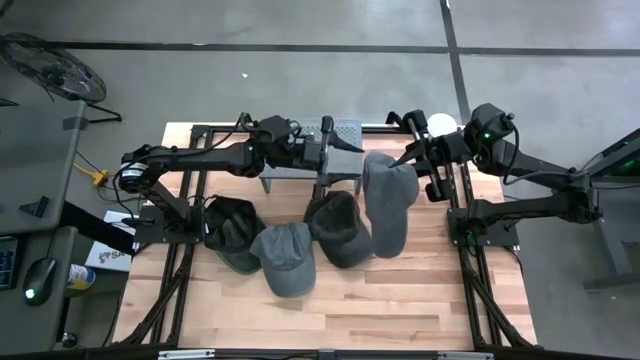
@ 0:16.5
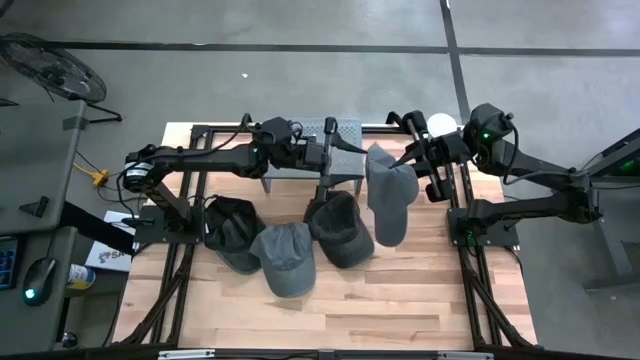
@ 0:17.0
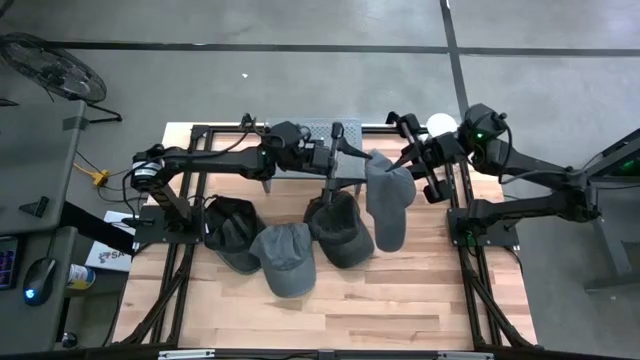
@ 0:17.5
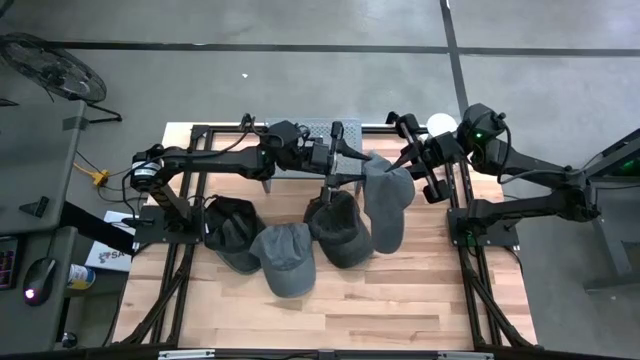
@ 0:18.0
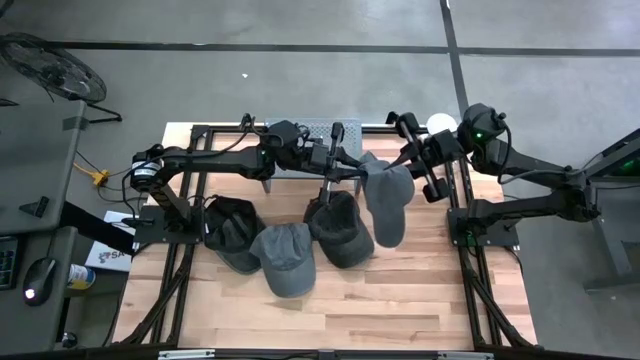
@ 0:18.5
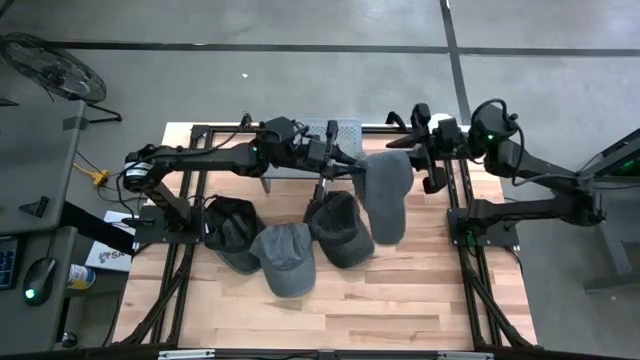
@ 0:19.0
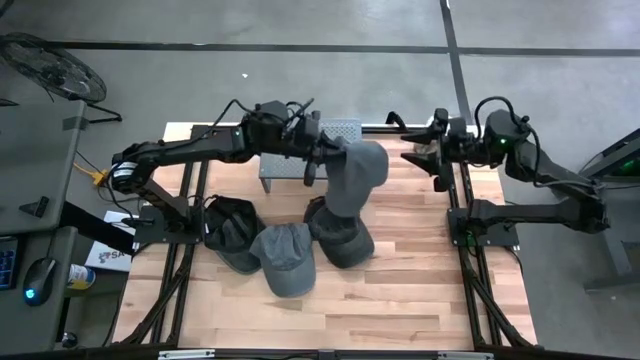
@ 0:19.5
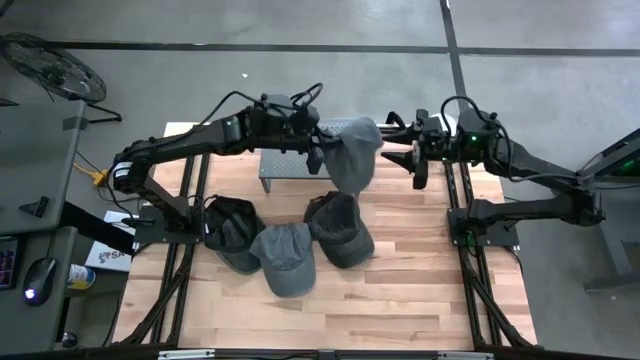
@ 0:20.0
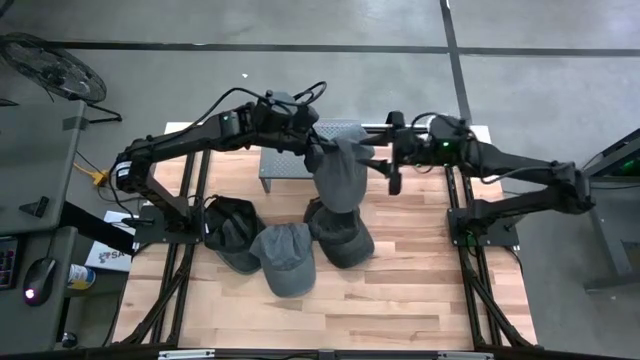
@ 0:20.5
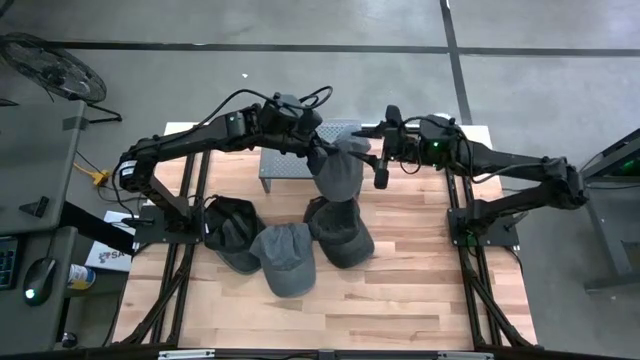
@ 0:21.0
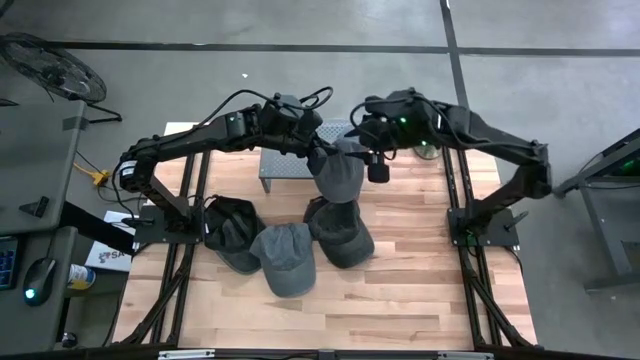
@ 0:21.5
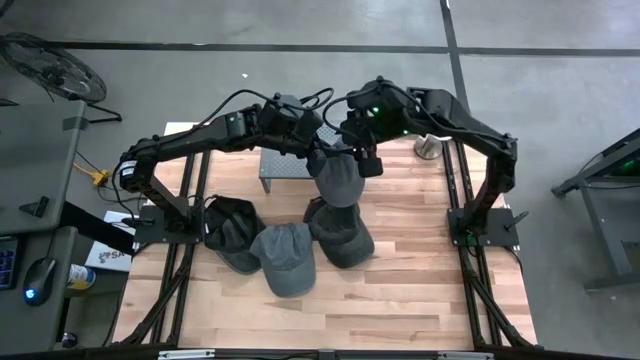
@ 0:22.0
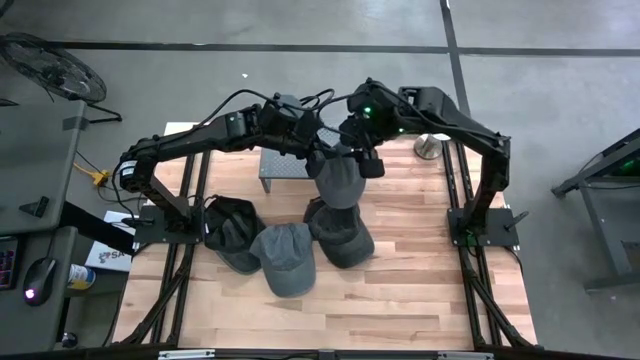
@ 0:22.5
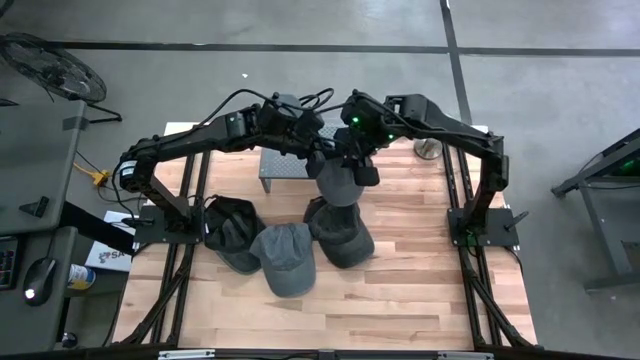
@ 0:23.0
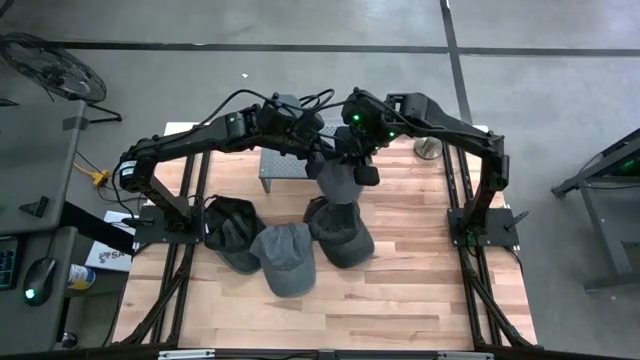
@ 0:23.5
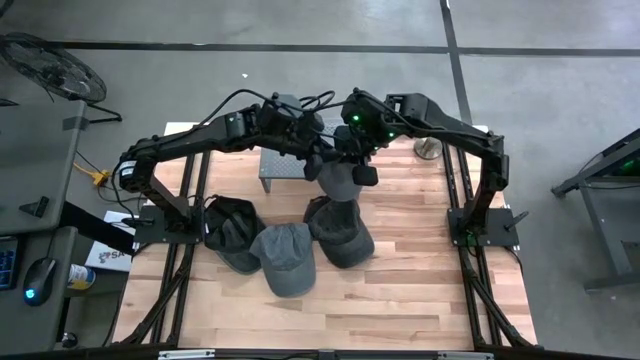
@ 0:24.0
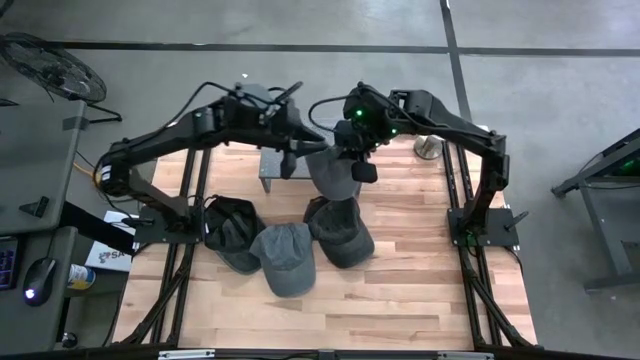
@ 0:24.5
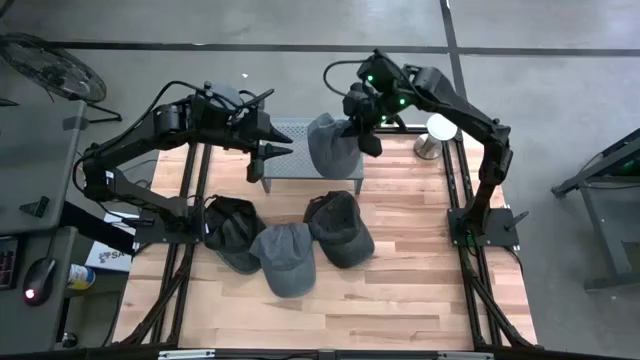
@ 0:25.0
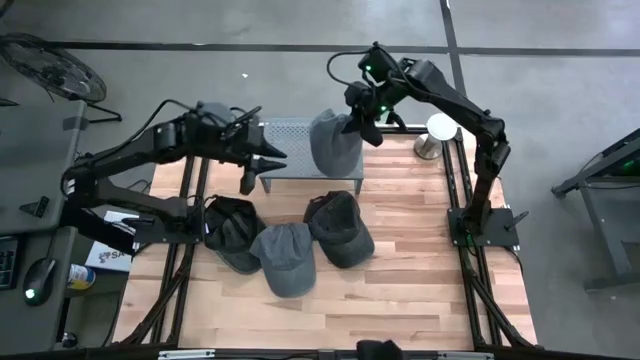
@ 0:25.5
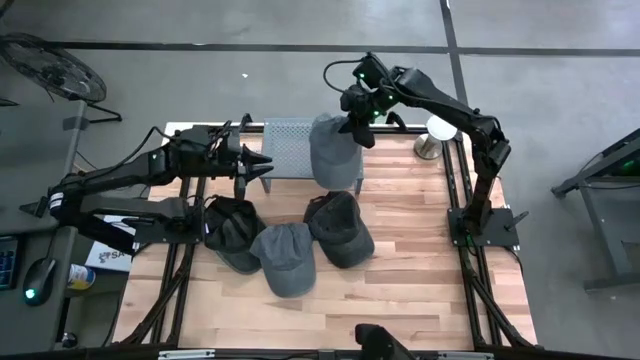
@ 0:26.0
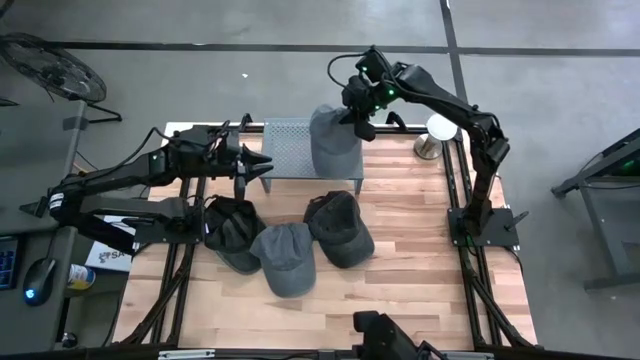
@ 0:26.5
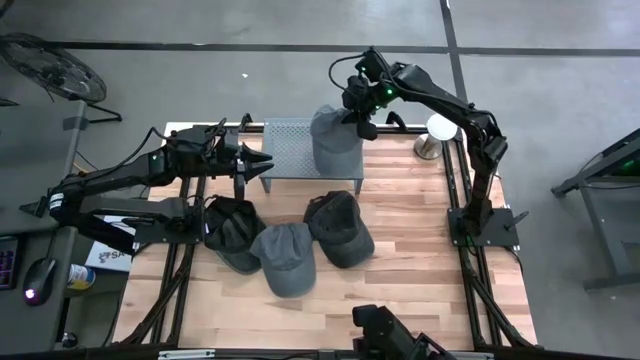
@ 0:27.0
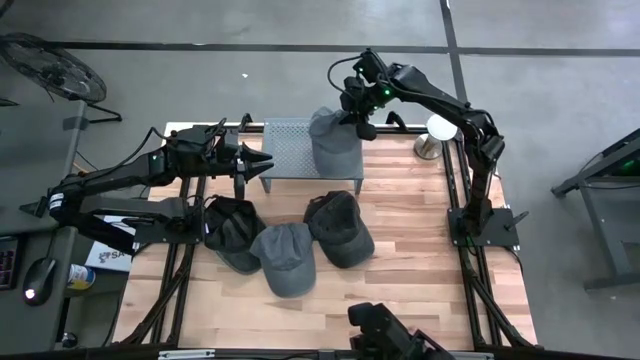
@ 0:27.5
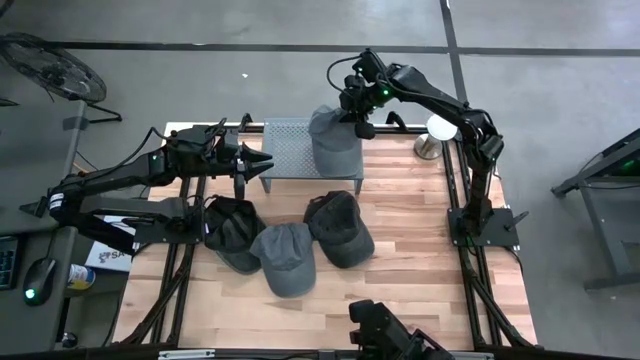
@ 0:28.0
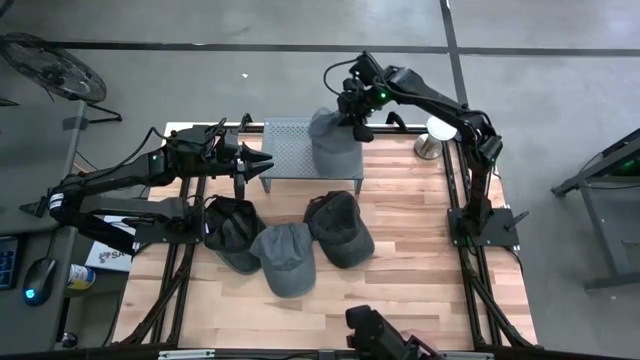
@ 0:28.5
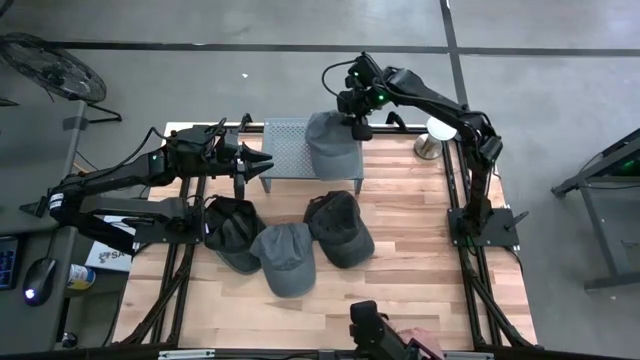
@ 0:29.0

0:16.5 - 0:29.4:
Task: Pick & Place hat
Put the right gray cap on the shelf

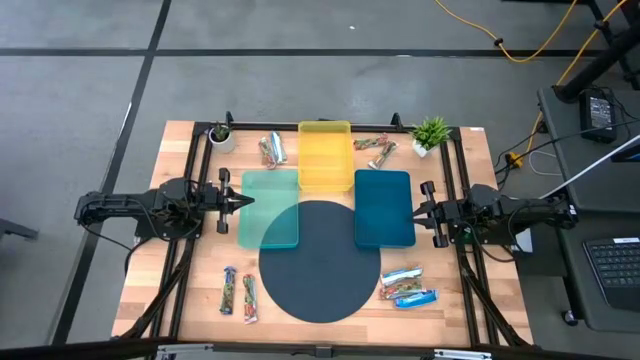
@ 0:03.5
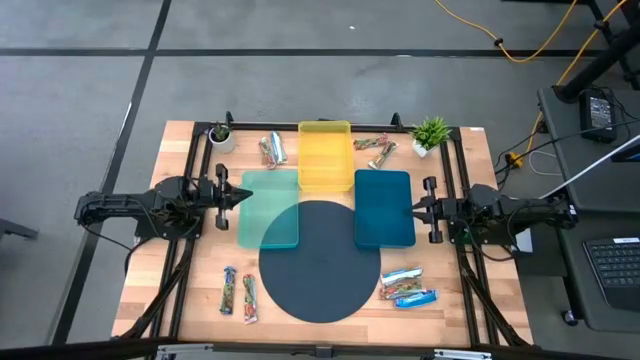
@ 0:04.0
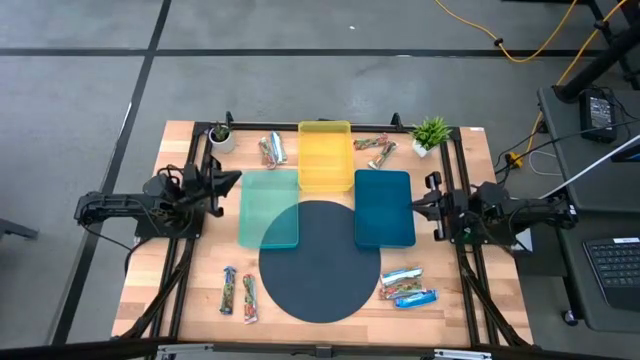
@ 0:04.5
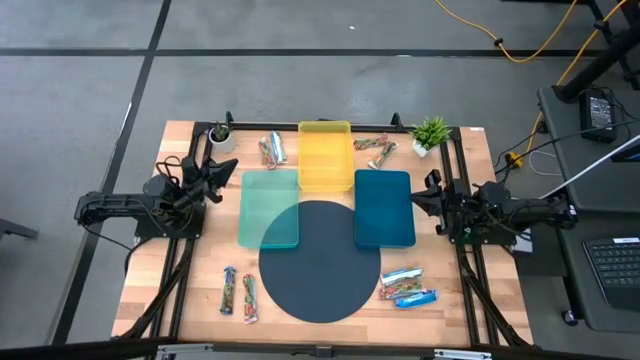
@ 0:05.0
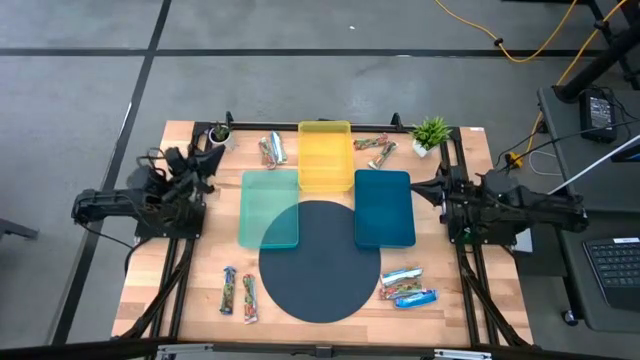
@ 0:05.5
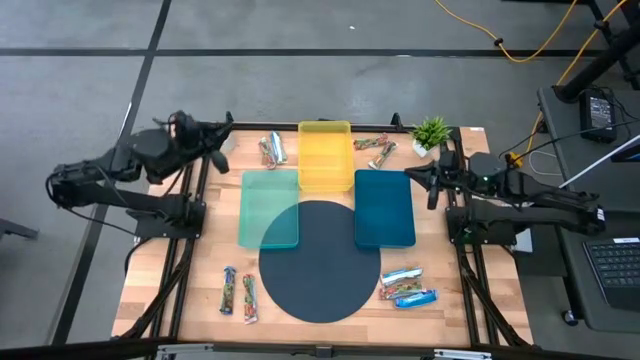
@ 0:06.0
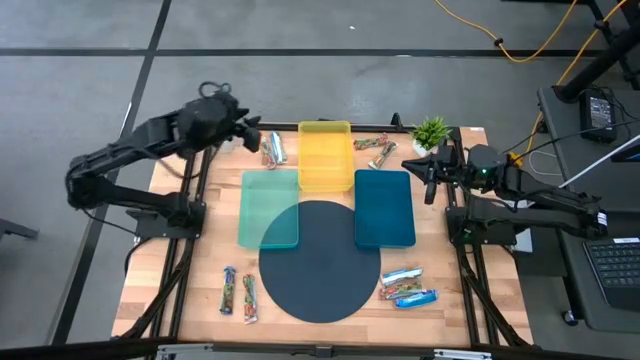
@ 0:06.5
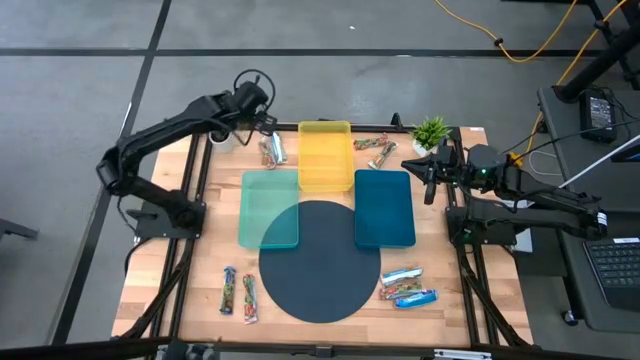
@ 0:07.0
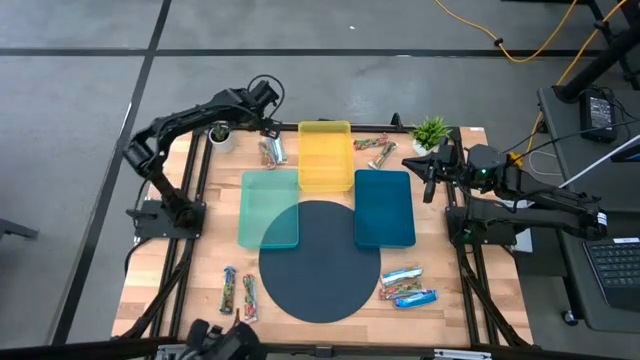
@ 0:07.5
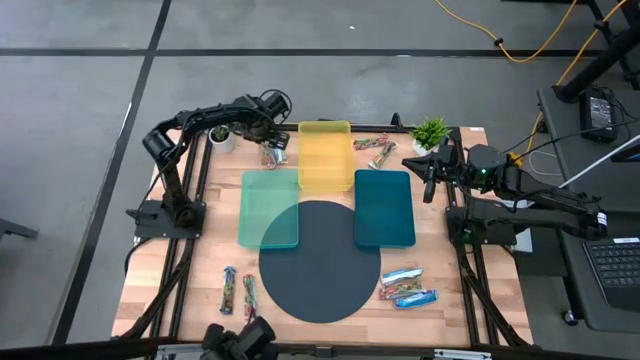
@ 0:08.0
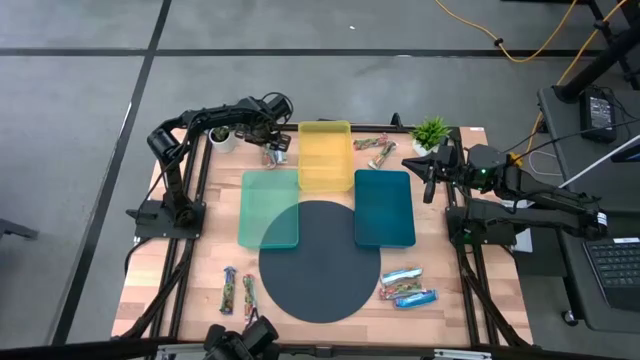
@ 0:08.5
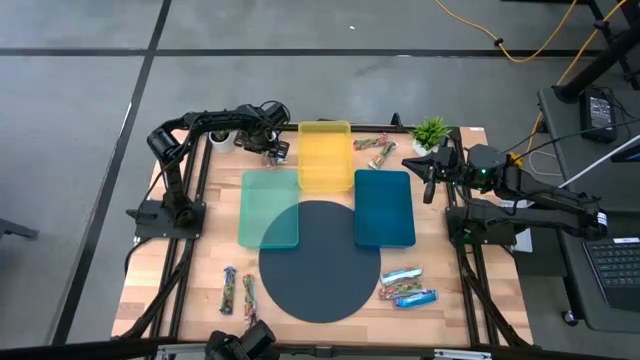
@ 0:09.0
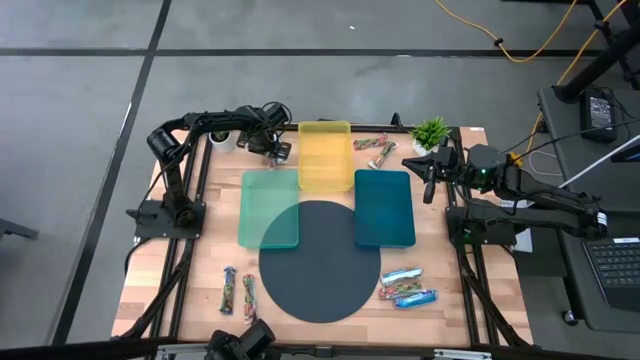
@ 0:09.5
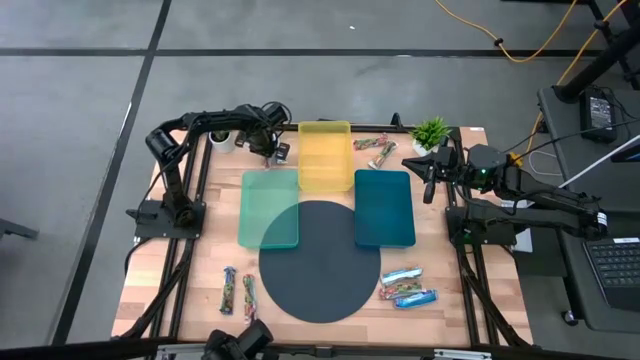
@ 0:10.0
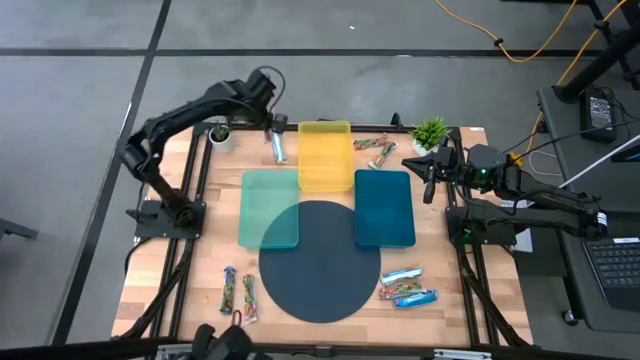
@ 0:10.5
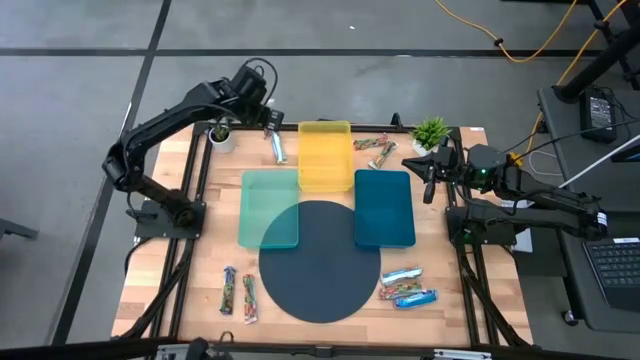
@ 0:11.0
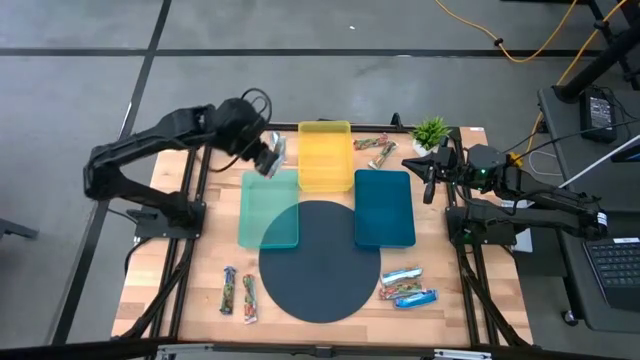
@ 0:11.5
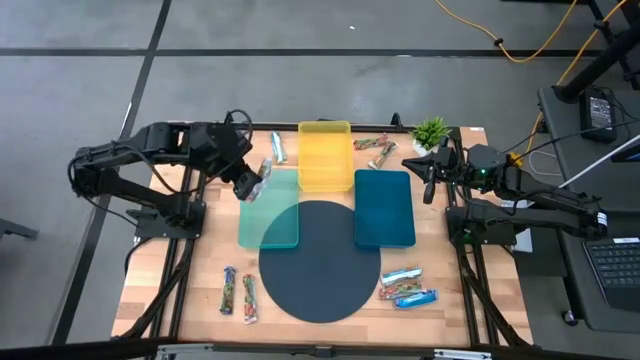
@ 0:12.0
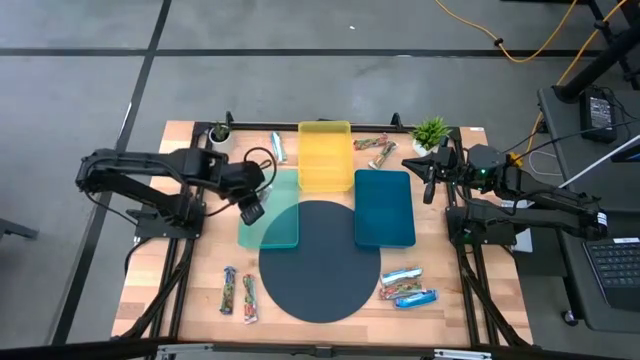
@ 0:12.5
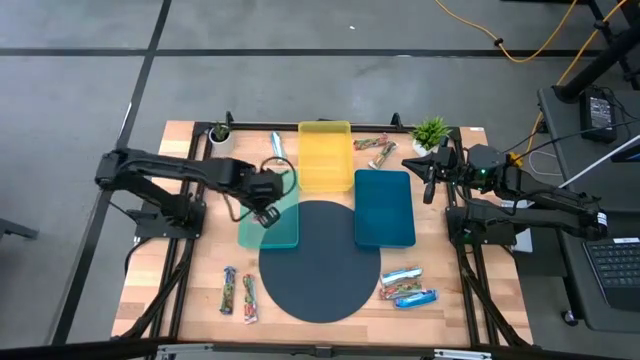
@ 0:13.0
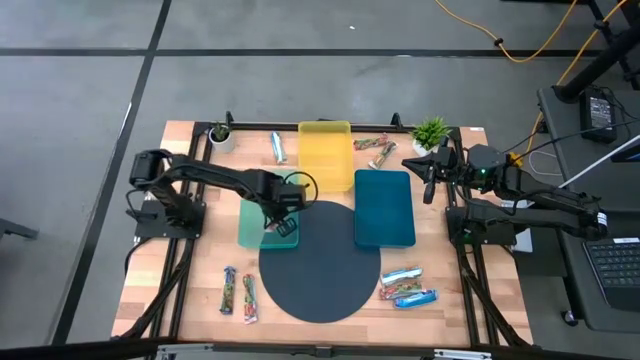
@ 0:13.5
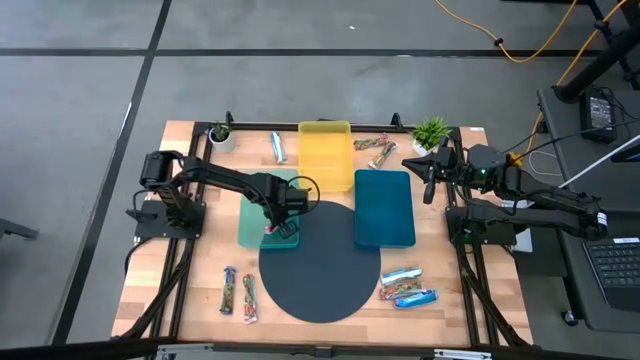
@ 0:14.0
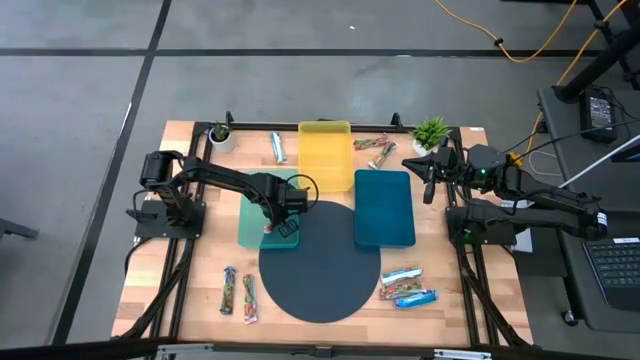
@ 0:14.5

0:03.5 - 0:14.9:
Task: Pick and place Granola Bars by type
Put the red granola bar into the light blue bin
